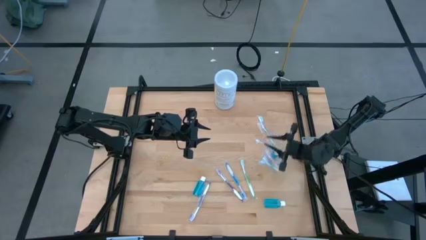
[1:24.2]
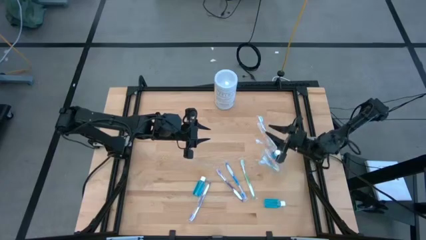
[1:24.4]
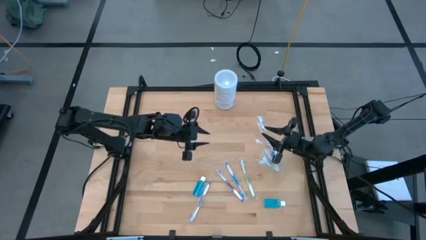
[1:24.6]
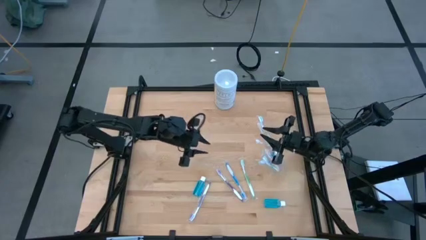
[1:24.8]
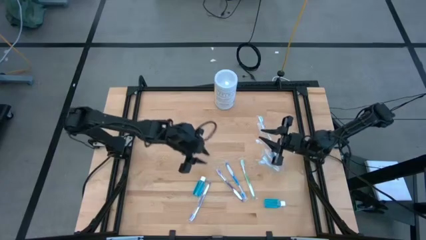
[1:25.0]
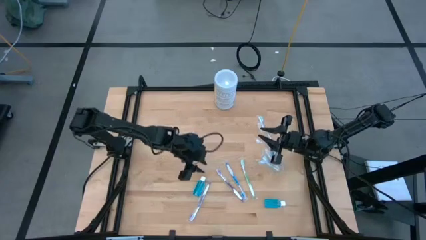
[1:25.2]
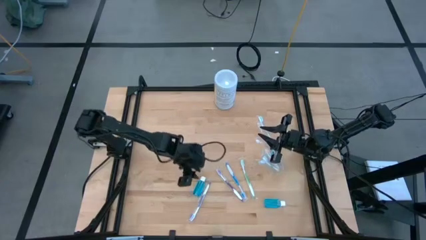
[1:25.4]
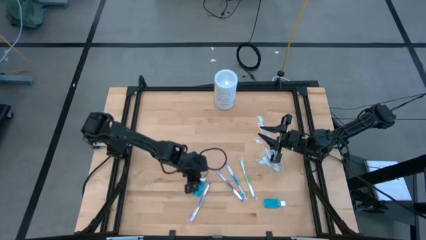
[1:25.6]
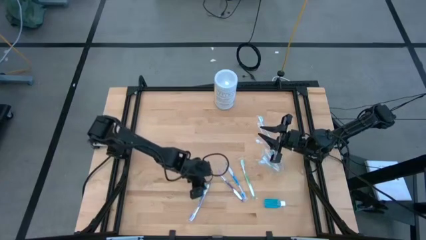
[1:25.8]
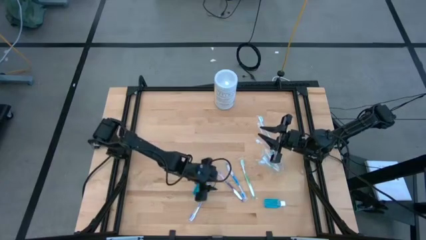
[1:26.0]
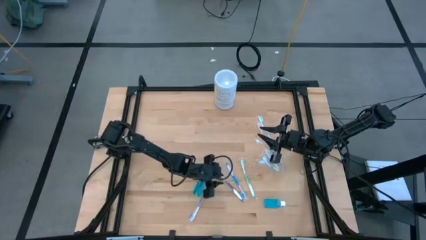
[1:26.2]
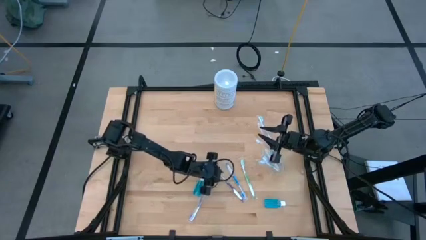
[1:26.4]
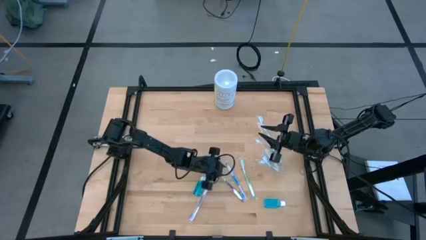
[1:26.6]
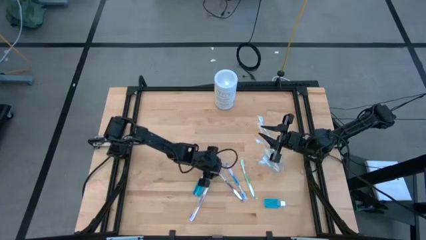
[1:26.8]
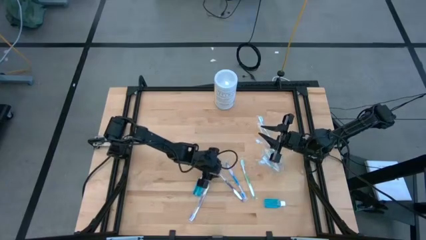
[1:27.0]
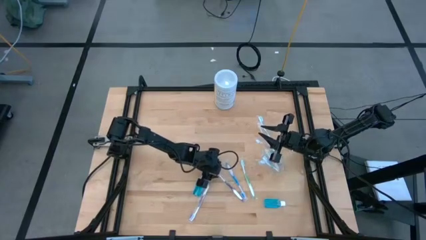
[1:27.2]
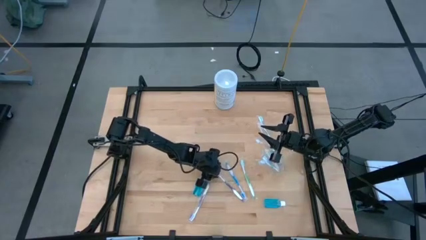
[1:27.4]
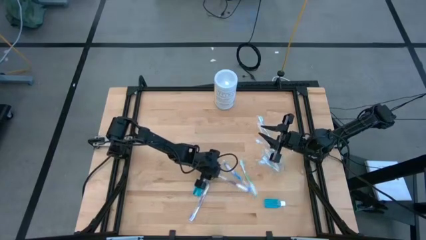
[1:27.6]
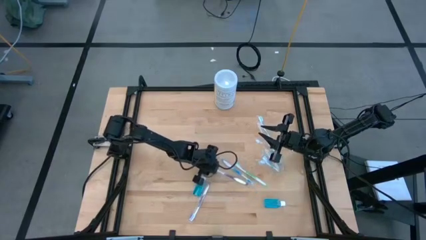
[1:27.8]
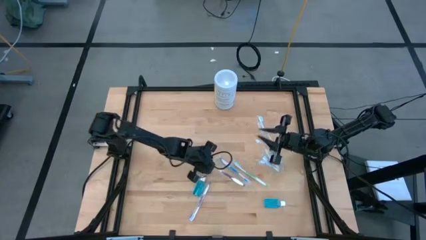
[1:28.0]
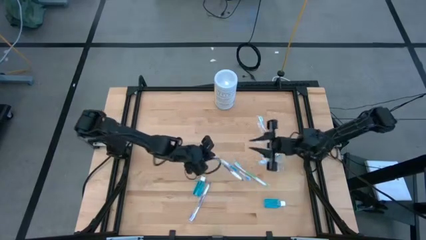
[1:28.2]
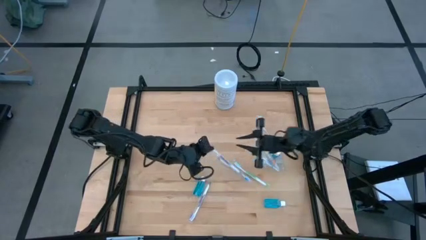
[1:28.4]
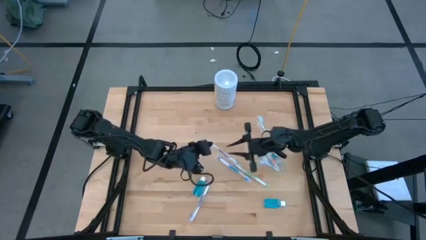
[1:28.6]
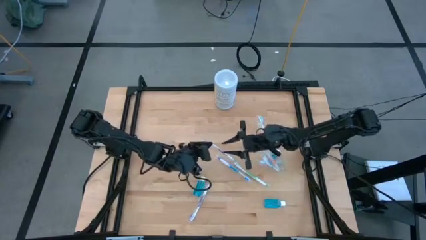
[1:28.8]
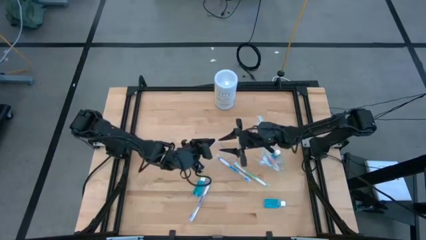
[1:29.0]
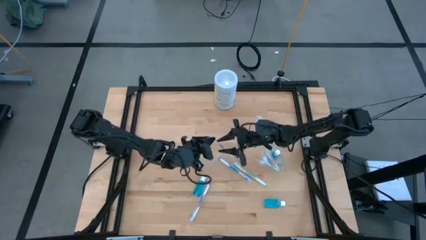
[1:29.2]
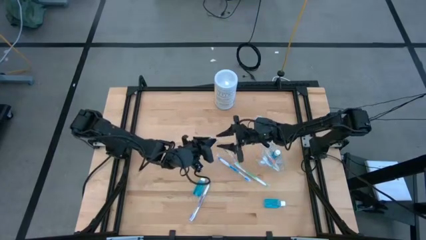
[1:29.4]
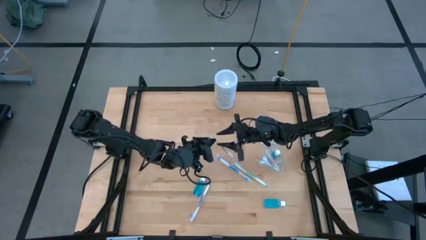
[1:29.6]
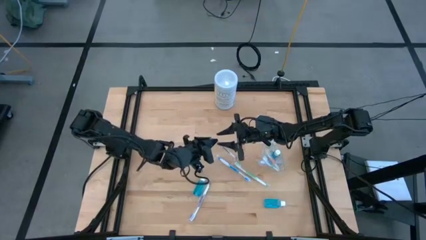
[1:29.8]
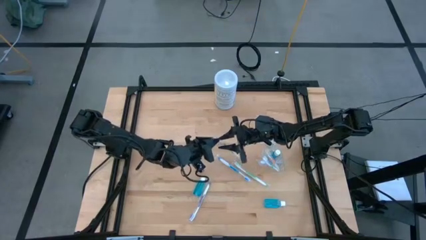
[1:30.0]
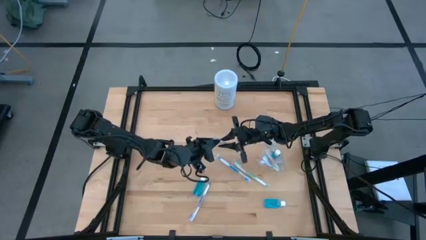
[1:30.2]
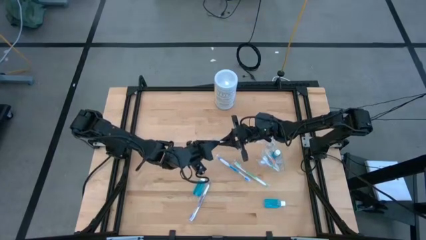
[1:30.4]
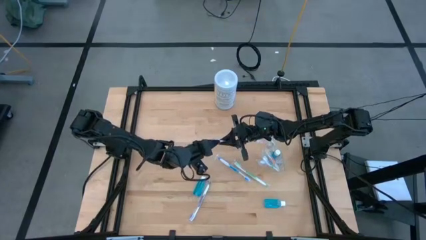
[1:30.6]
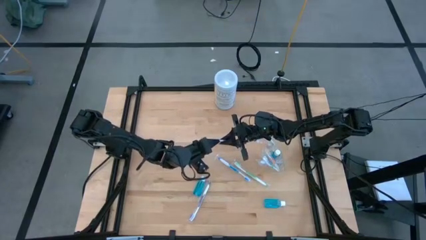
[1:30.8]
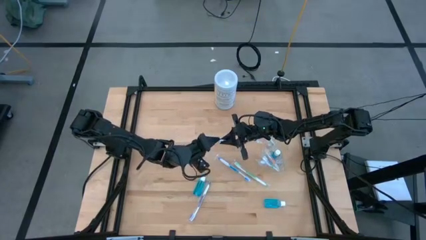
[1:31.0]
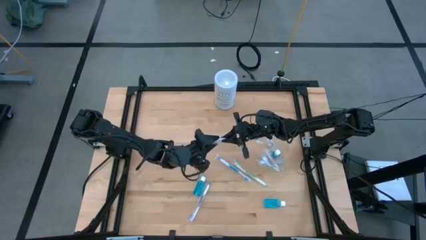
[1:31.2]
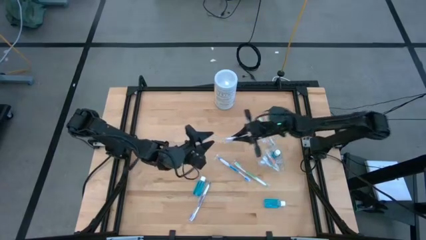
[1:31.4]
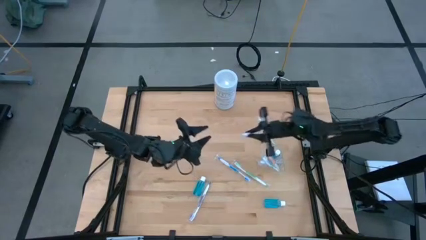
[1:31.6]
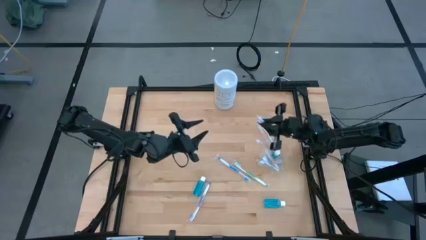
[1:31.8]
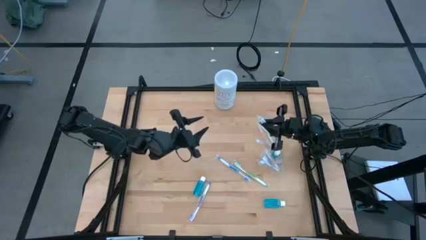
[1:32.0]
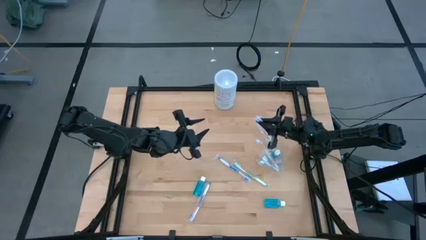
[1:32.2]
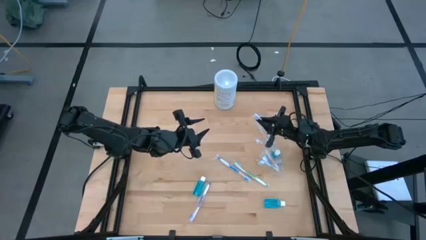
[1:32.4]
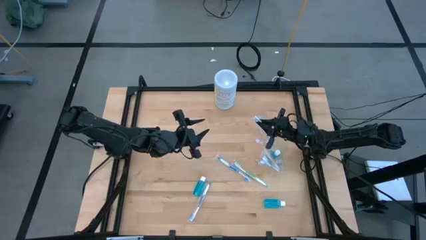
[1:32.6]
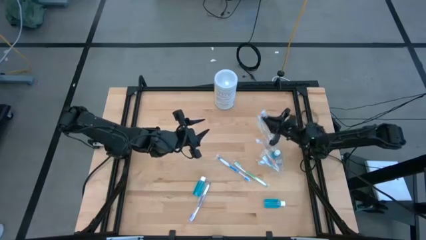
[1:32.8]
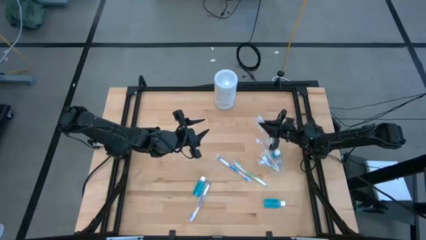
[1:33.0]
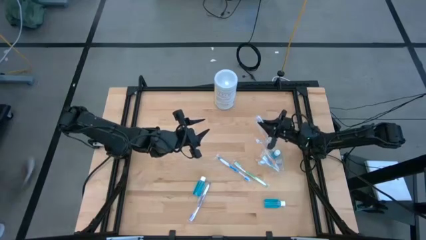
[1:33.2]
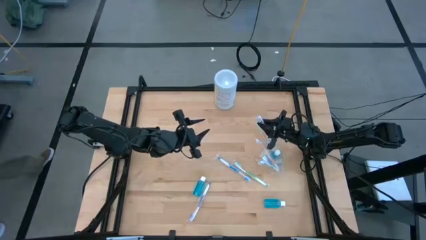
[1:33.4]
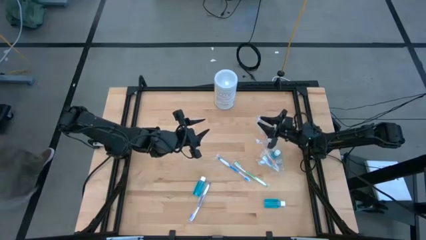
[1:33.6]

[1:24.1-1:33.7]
Task: Pick & Place toothbrushing station
Put the right purple toothbrush into the transparent organizer
